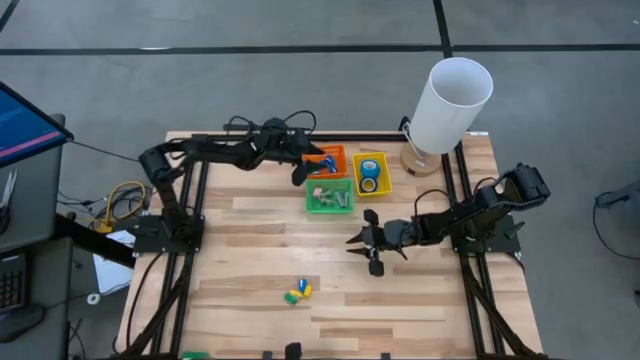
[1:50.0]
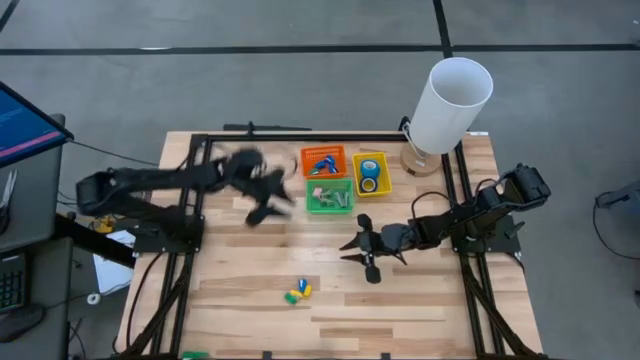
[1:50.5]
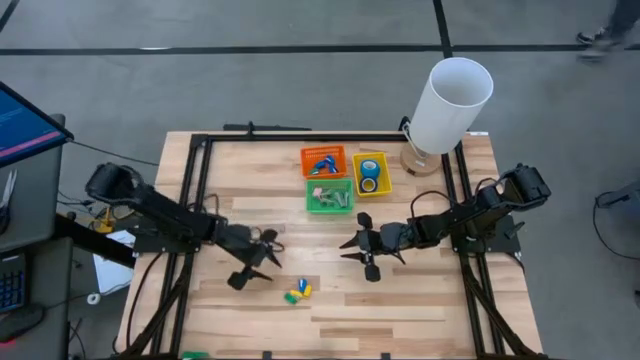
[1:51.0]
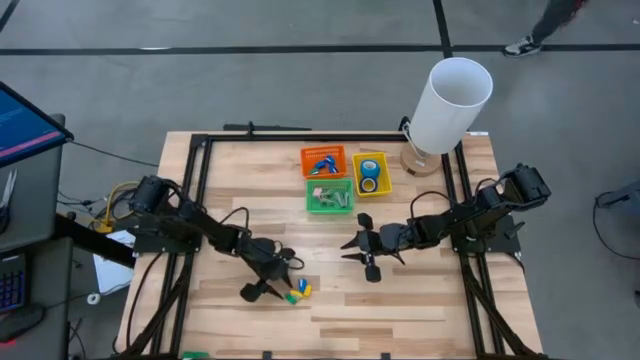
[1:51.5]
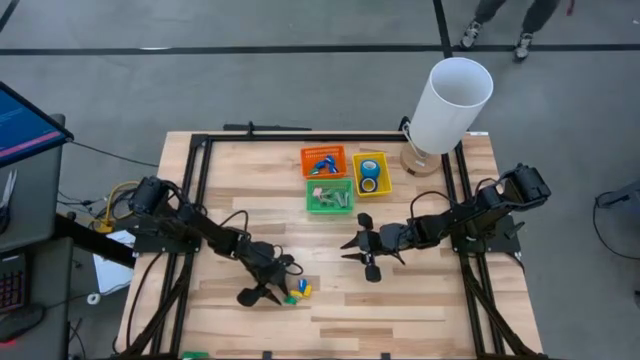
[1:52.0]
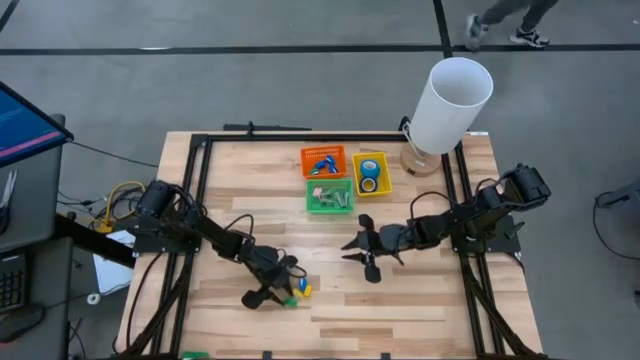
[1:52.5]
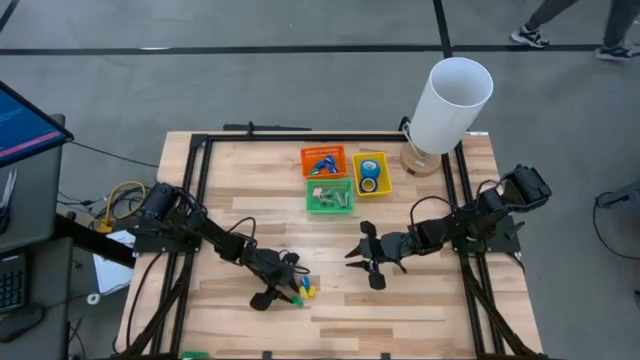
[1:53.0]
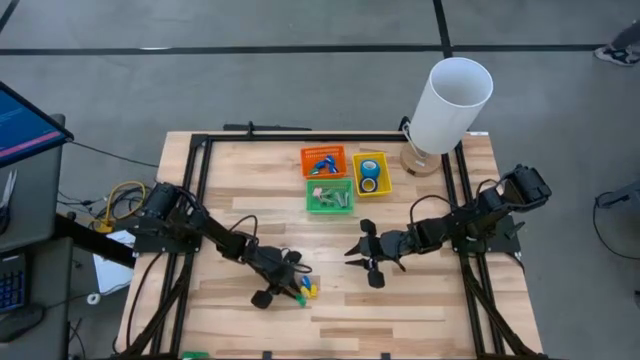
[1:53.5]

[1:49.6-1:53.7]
Task: Pick and place Stapler, Stapler remover, tape
Put the green stapler into the orange bin

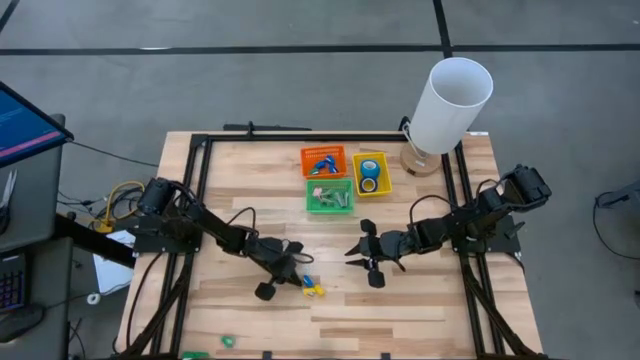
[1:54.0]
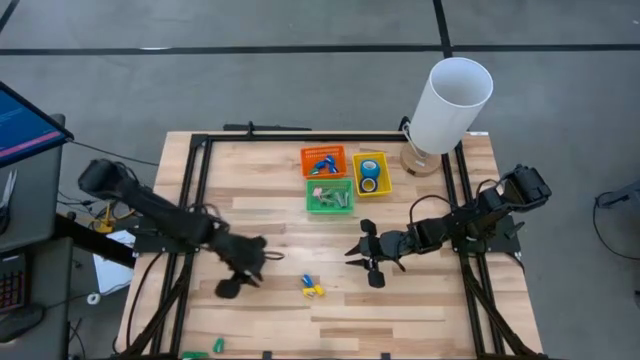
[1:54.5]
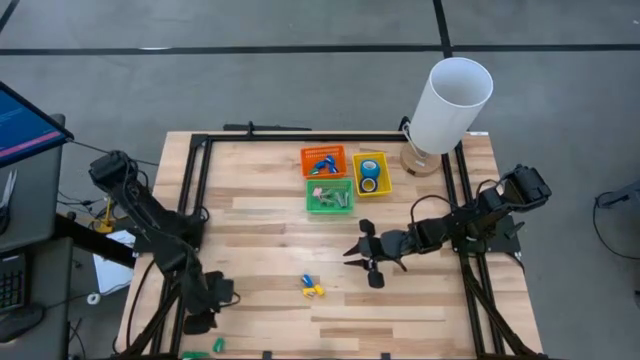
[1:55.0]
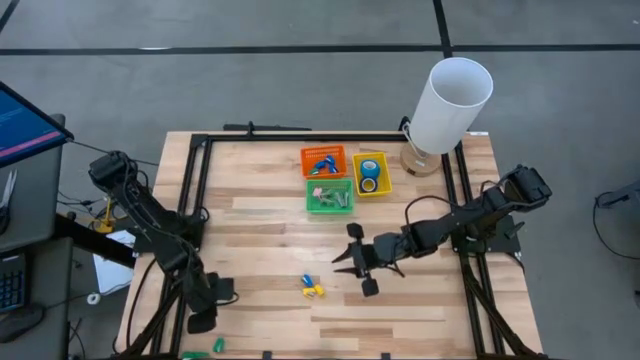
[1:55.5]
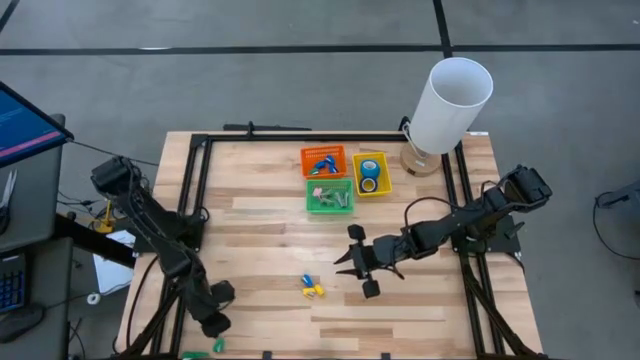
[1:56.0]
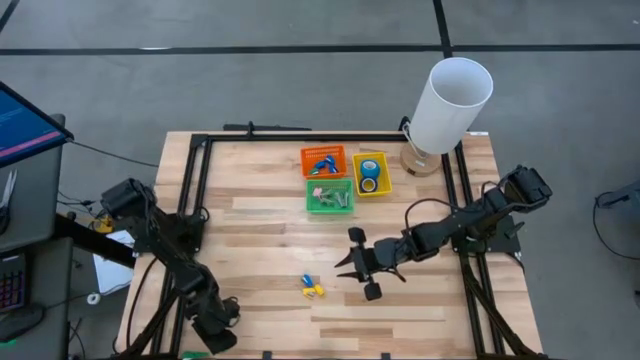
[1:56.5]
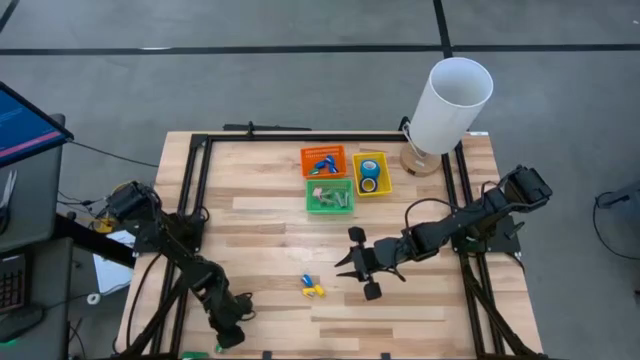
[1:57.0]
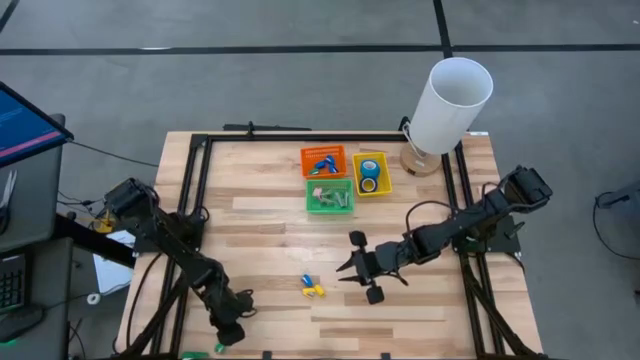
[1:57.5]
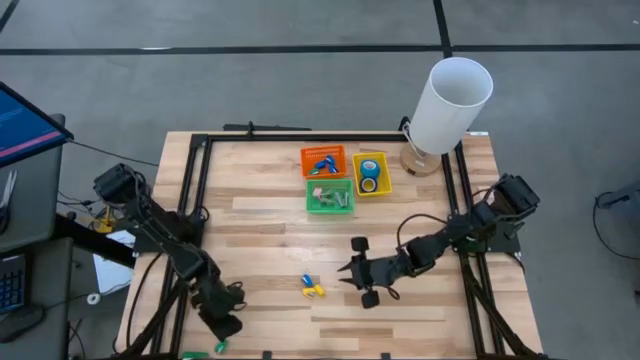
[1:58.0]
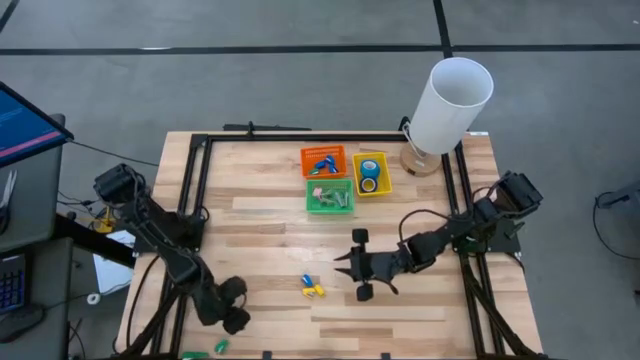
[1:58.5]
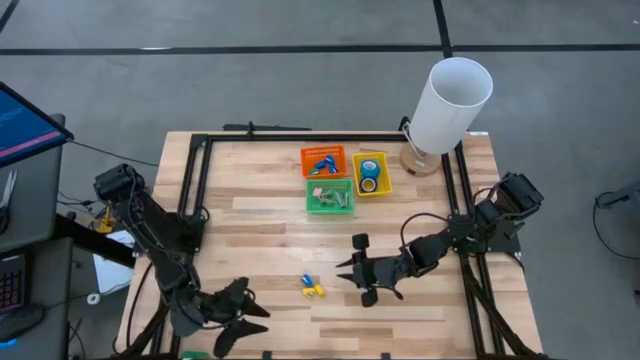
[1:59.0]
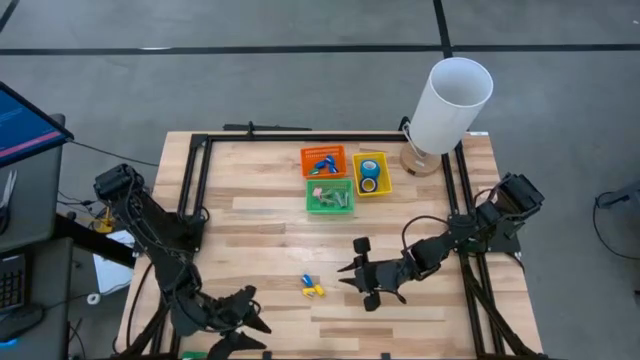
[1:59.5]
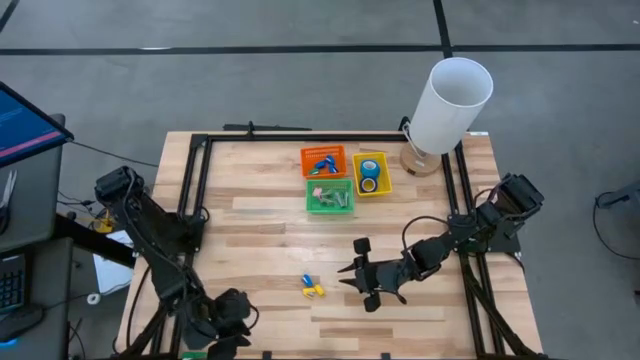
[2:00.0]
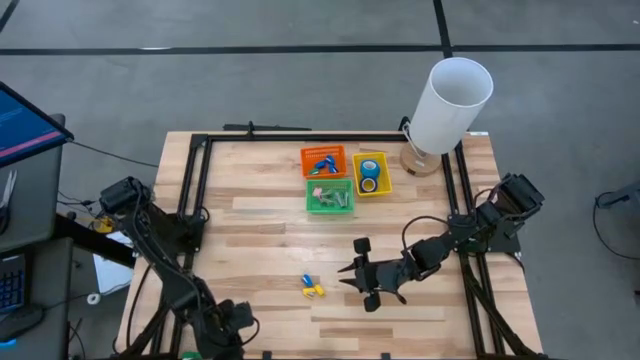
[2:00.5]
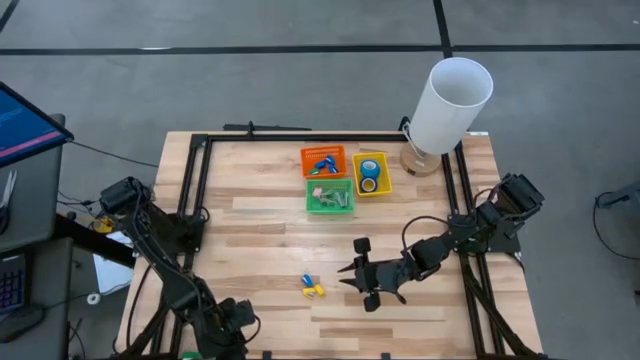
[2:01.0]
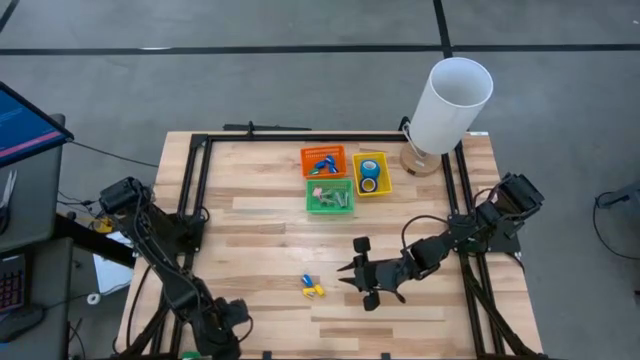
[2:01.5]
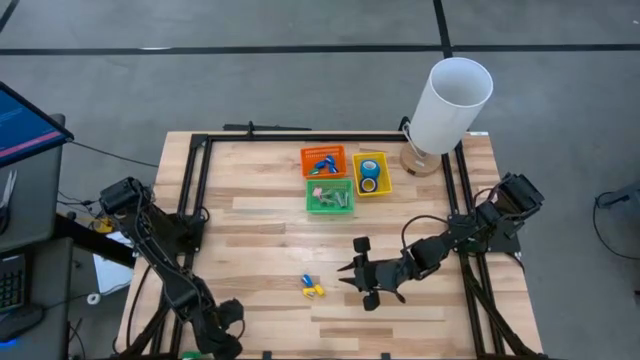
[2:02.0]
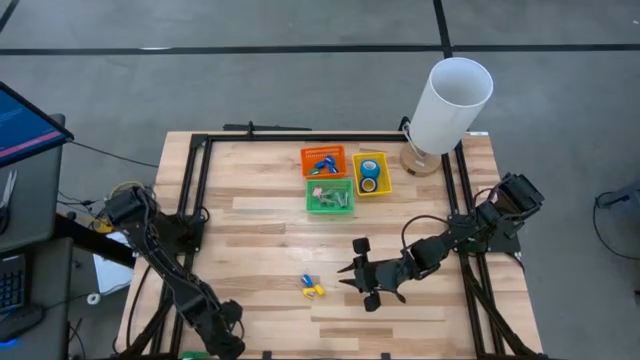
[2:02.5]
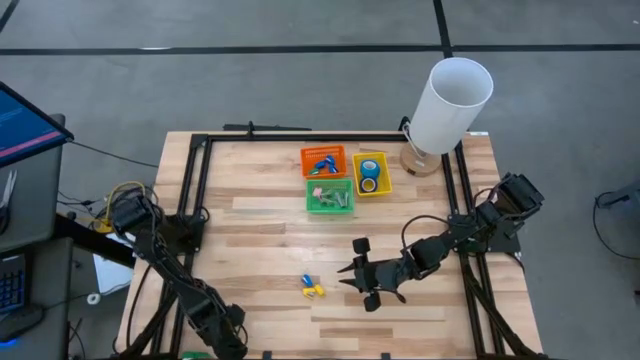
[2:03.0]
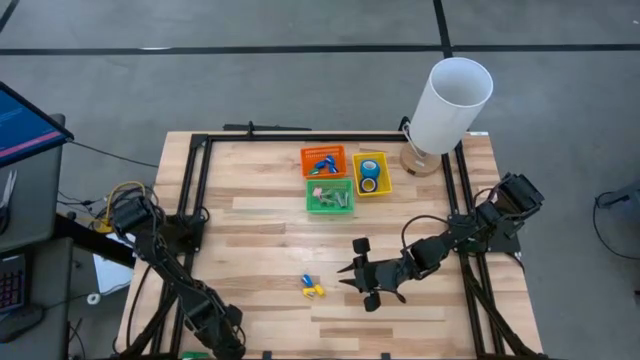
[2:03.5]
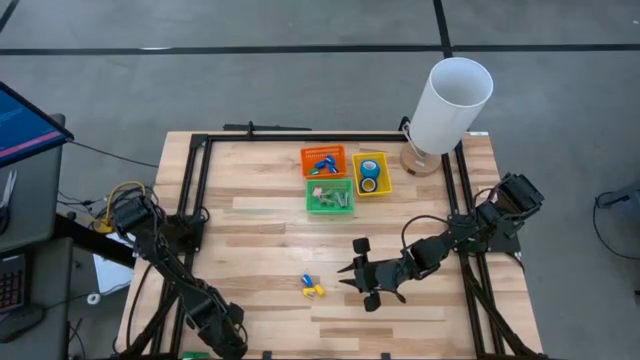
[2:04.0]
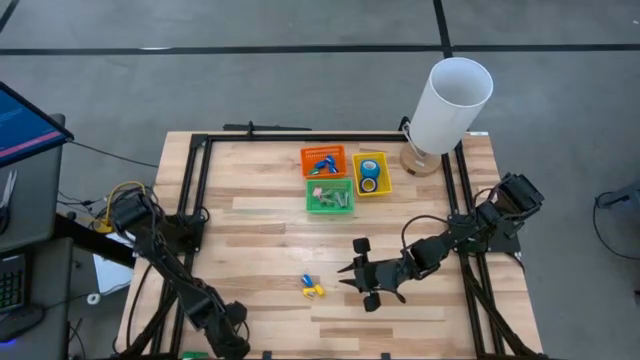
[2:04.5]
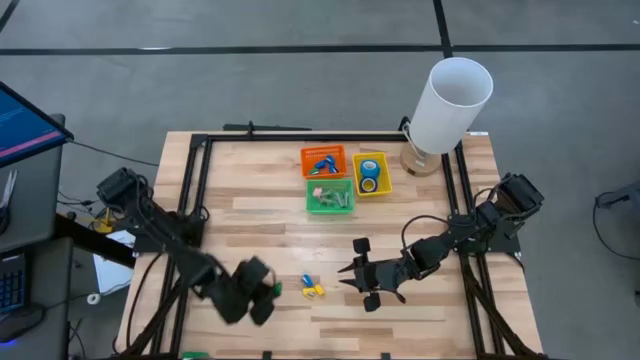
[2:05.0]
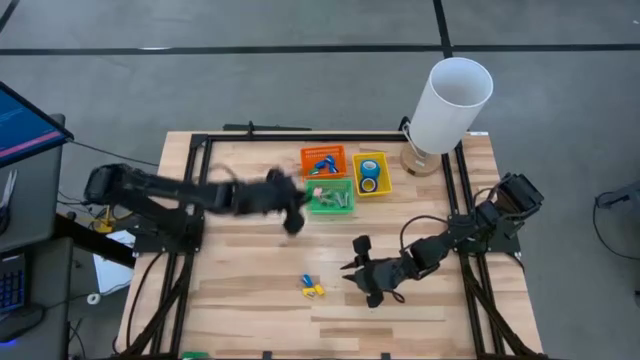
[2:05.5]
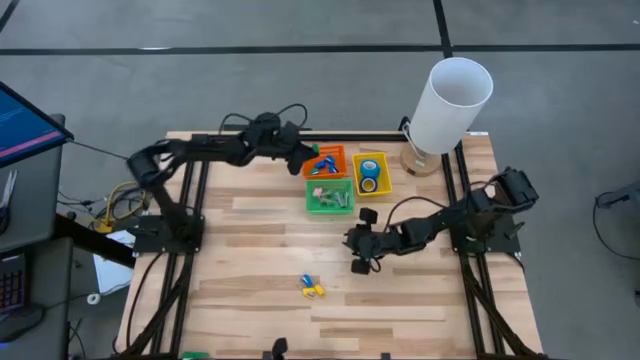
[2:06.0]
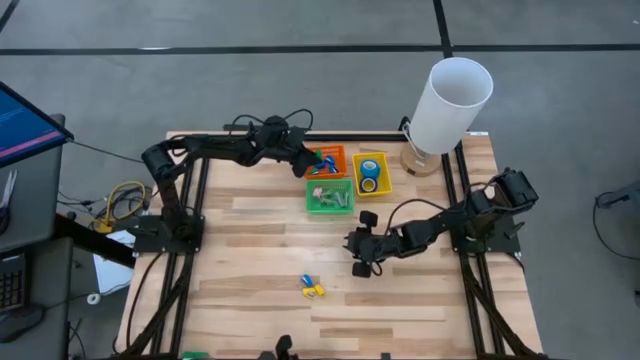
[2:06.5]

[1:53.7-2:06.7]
Put the green stapler into the orange bin

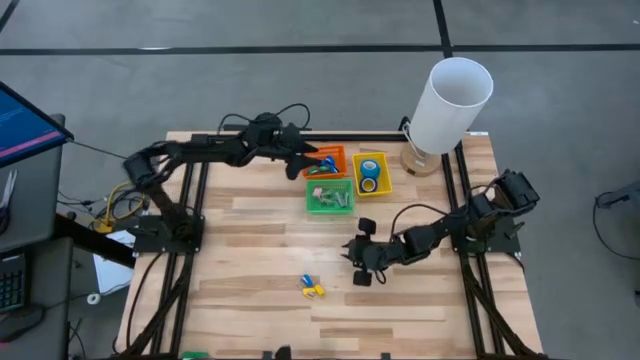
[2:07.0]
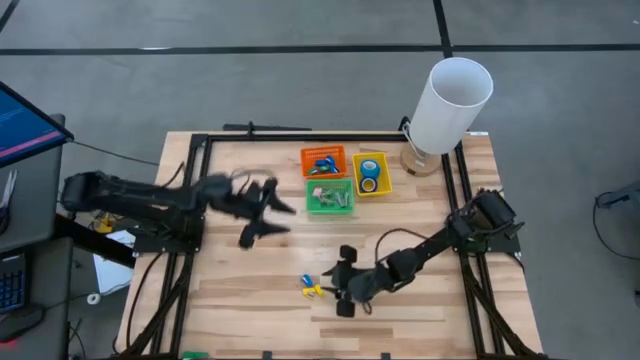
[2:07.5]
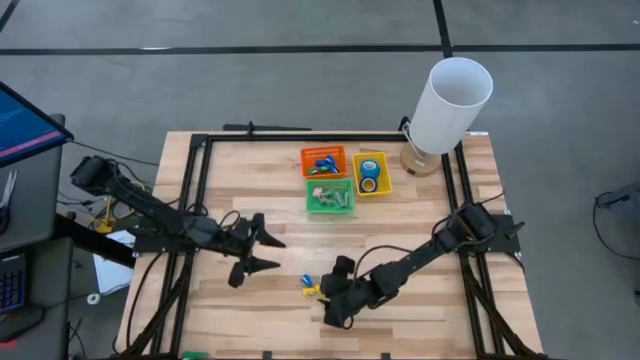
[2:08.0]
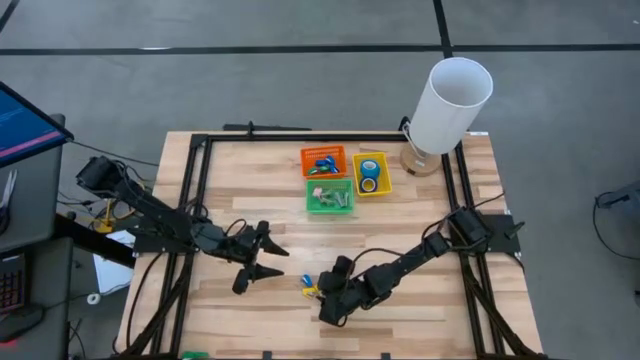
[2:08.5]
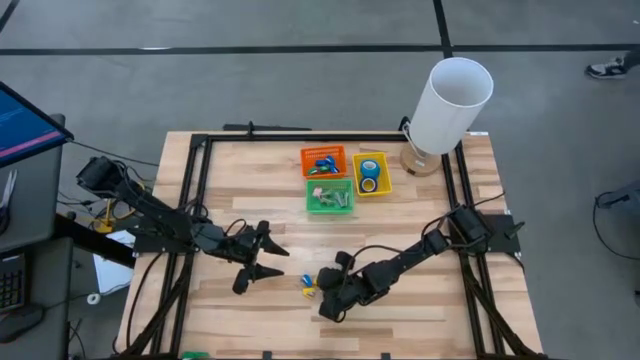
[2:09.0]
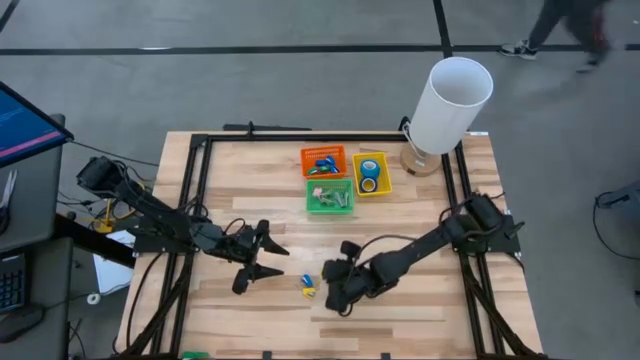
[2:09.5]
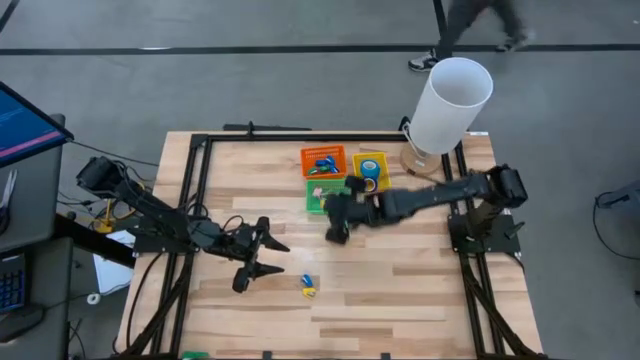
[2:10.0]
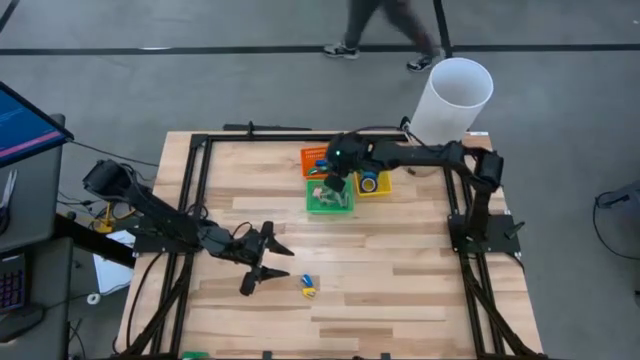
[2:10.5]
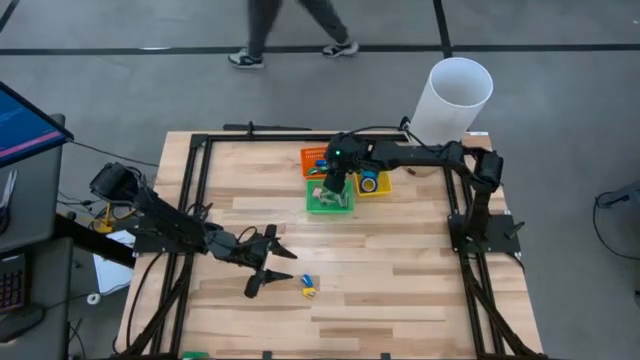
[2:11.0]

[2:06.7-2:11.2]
Put the yellow stapler into the orange bin
